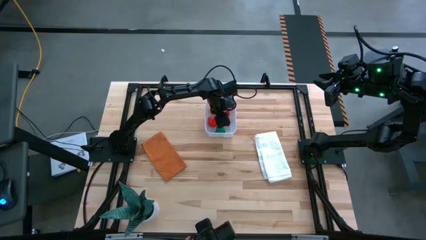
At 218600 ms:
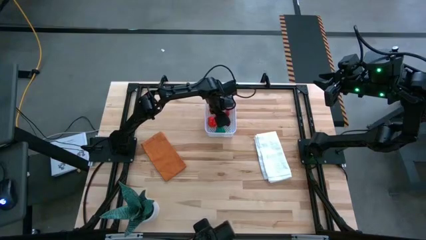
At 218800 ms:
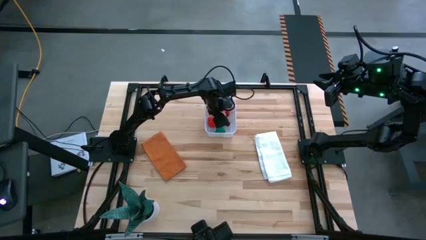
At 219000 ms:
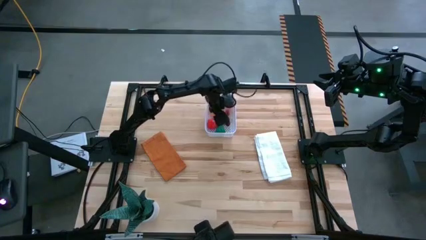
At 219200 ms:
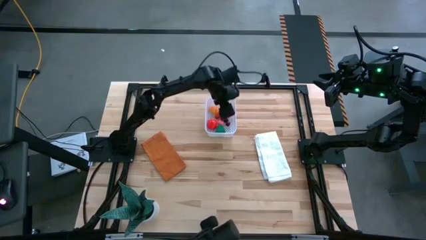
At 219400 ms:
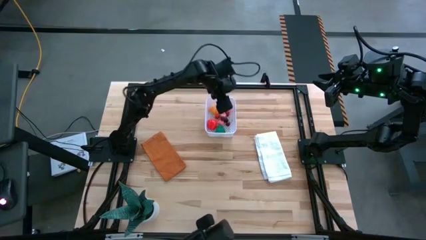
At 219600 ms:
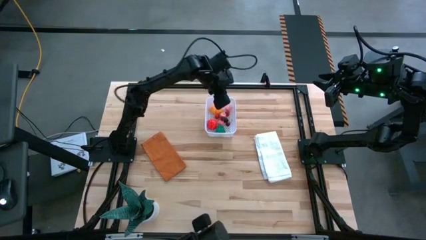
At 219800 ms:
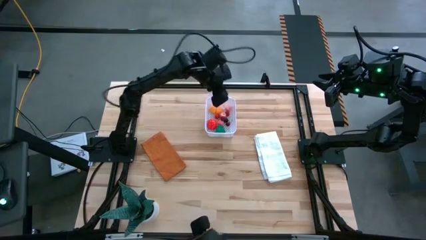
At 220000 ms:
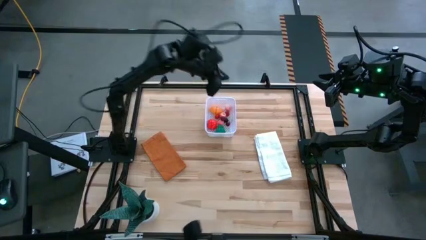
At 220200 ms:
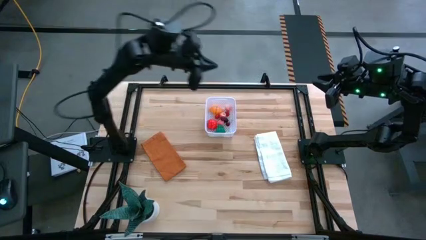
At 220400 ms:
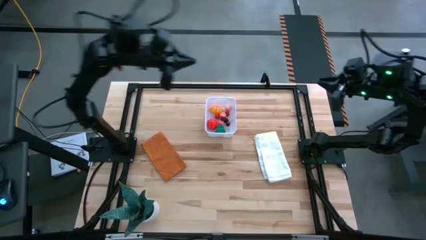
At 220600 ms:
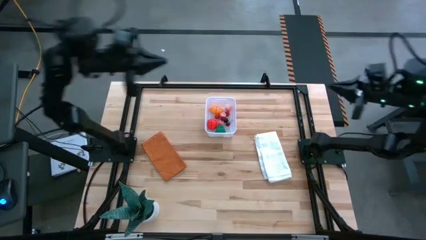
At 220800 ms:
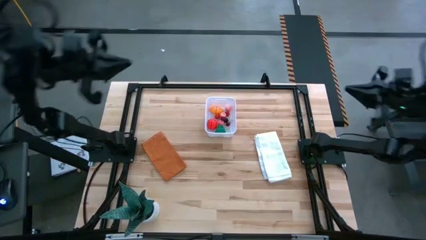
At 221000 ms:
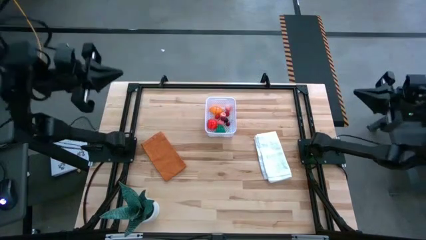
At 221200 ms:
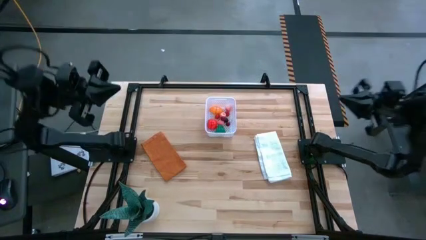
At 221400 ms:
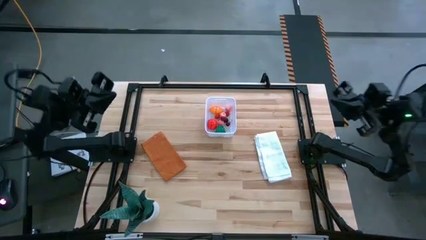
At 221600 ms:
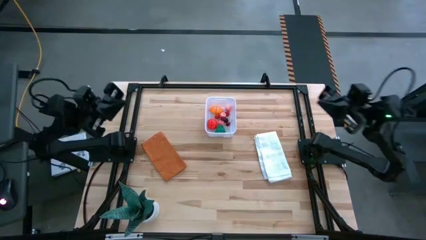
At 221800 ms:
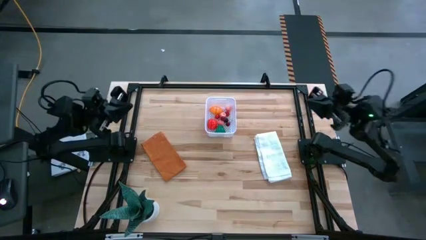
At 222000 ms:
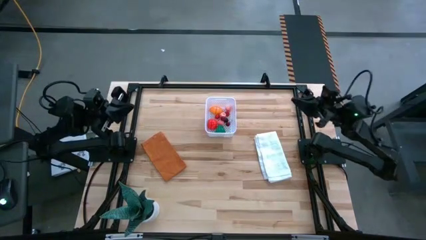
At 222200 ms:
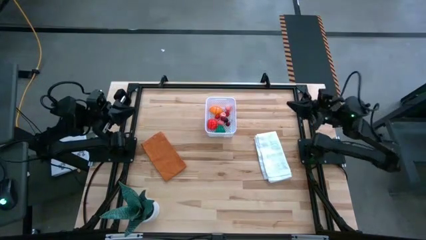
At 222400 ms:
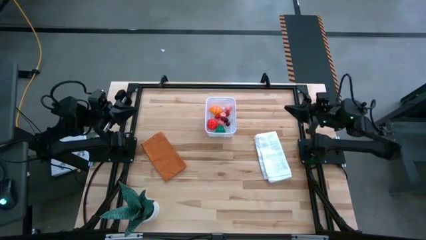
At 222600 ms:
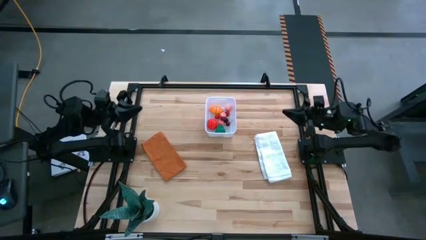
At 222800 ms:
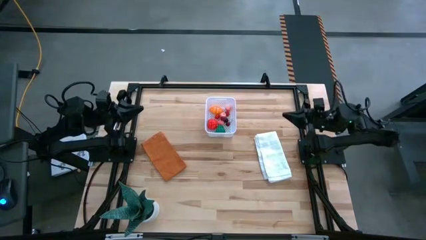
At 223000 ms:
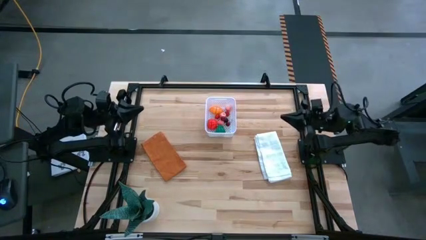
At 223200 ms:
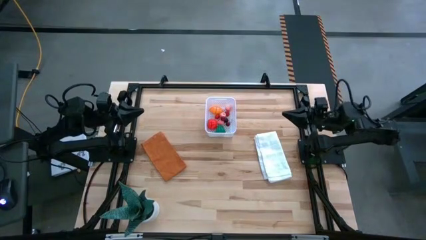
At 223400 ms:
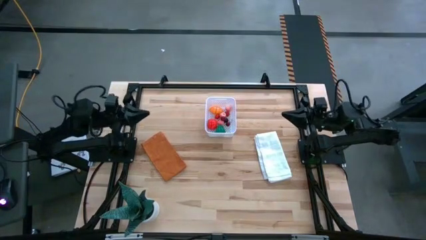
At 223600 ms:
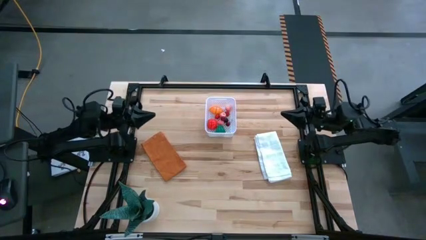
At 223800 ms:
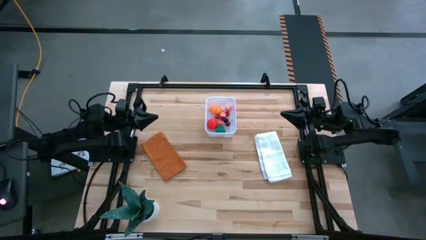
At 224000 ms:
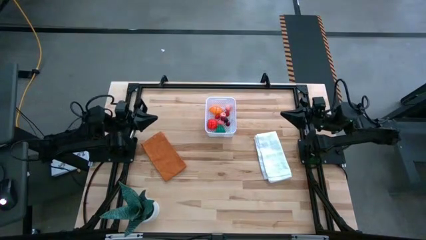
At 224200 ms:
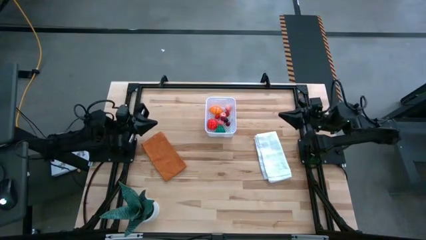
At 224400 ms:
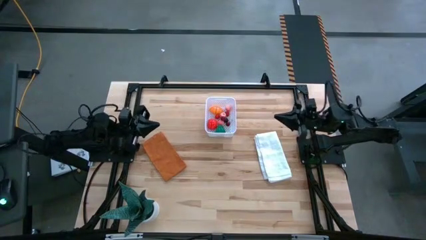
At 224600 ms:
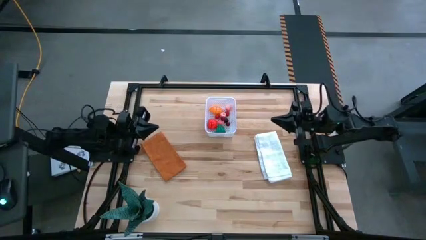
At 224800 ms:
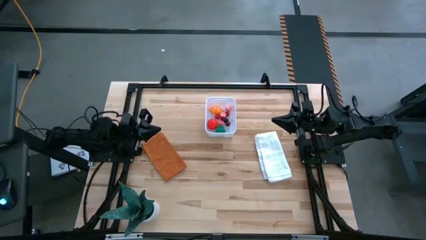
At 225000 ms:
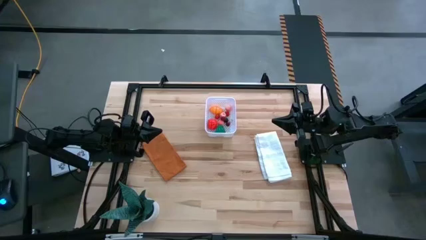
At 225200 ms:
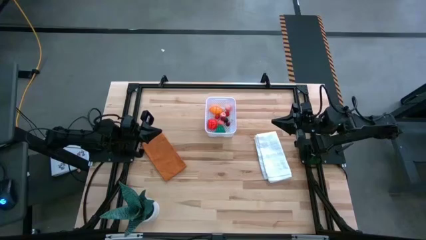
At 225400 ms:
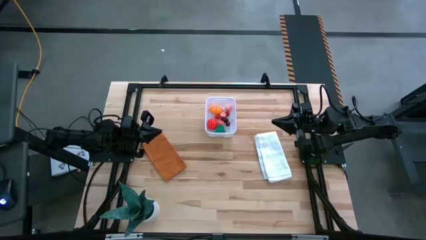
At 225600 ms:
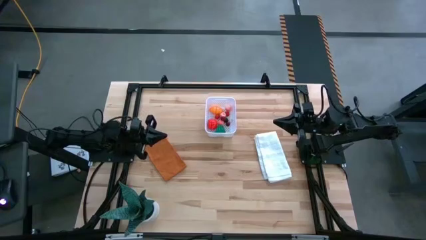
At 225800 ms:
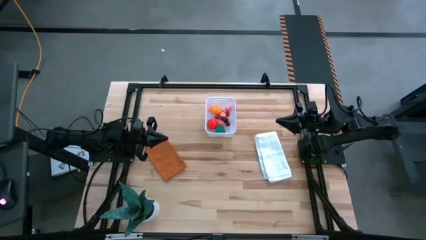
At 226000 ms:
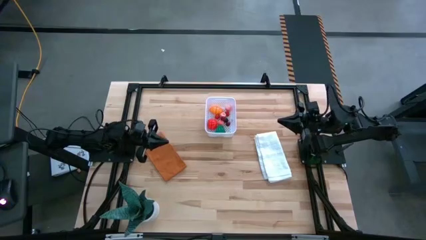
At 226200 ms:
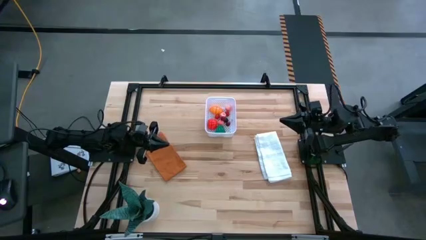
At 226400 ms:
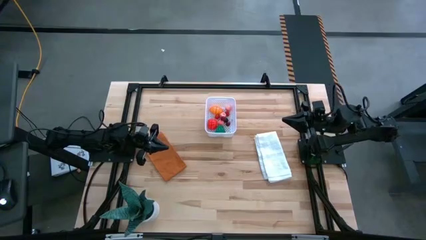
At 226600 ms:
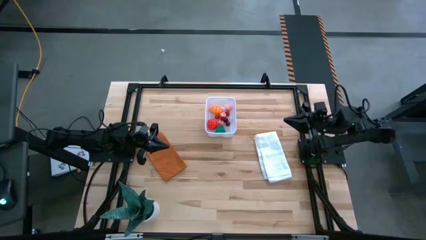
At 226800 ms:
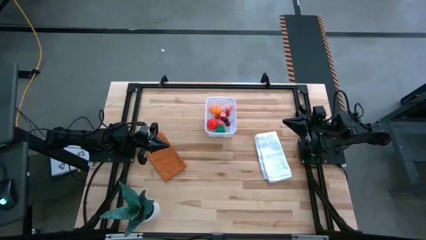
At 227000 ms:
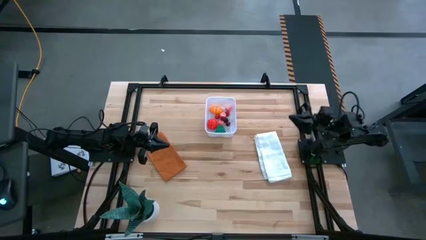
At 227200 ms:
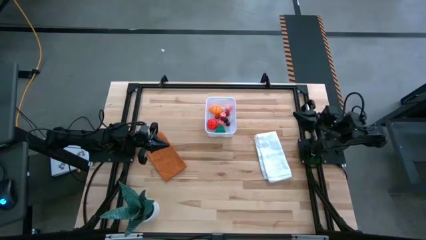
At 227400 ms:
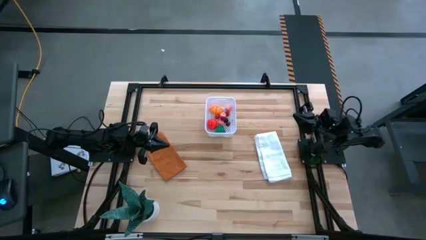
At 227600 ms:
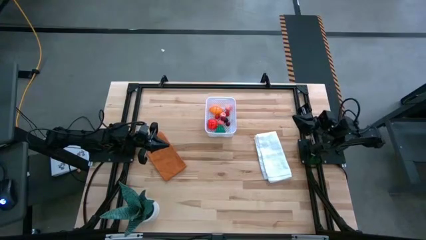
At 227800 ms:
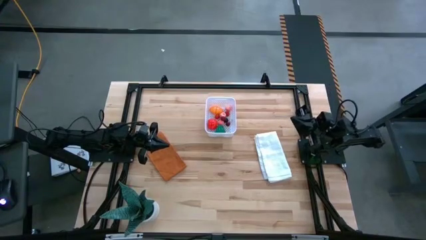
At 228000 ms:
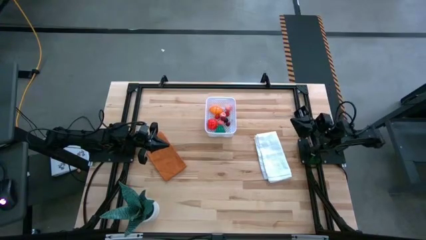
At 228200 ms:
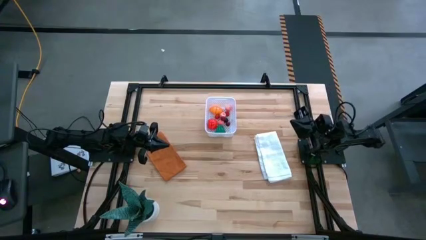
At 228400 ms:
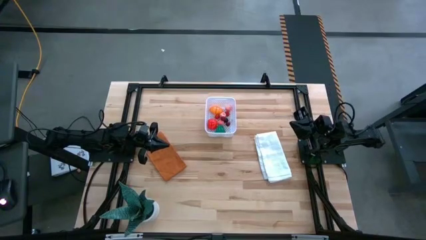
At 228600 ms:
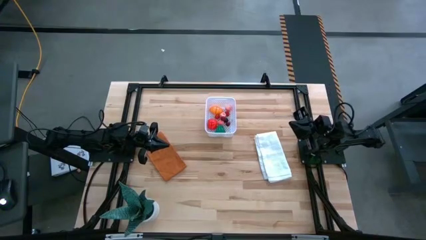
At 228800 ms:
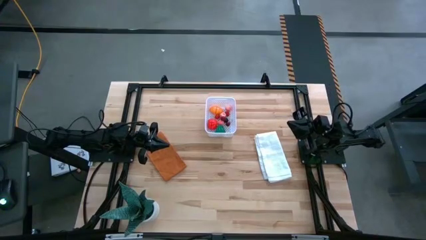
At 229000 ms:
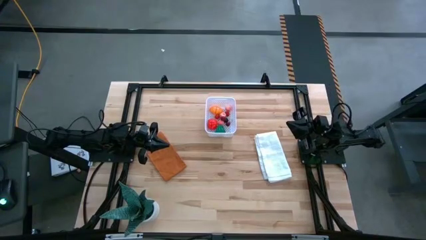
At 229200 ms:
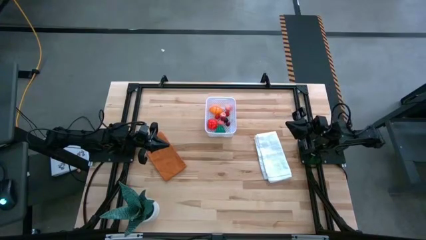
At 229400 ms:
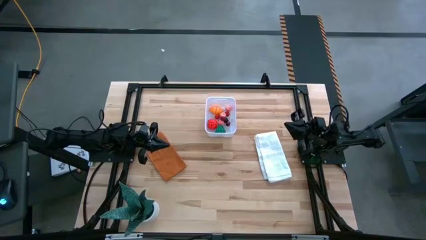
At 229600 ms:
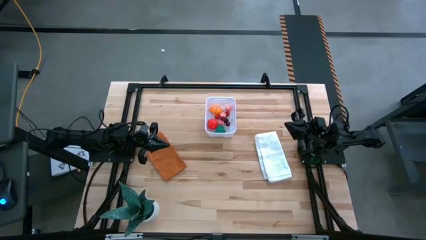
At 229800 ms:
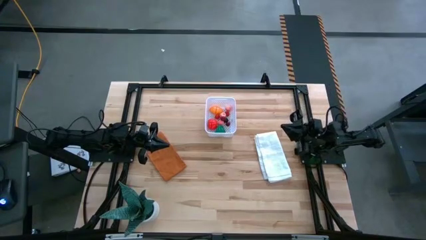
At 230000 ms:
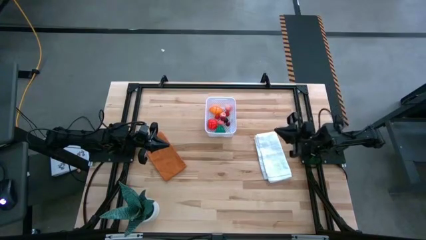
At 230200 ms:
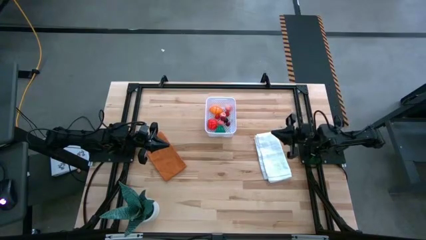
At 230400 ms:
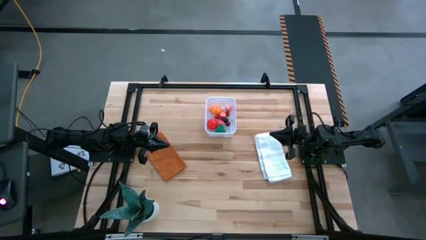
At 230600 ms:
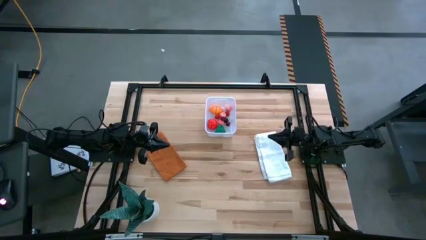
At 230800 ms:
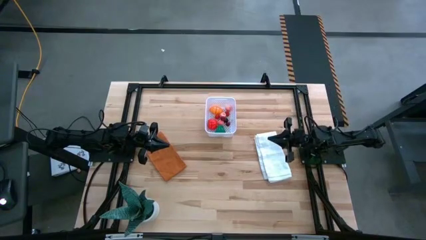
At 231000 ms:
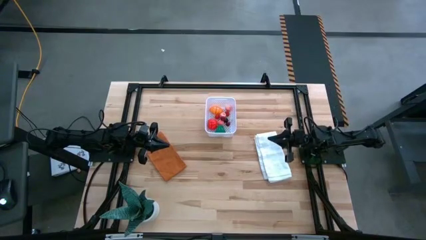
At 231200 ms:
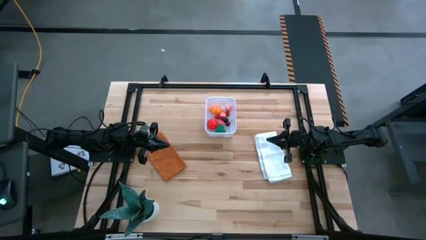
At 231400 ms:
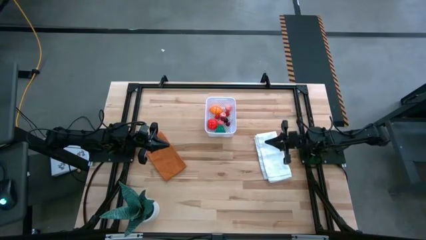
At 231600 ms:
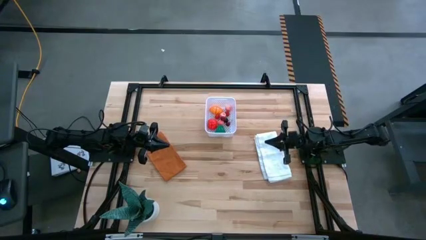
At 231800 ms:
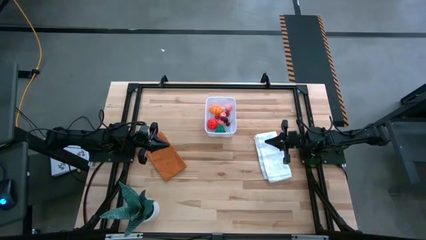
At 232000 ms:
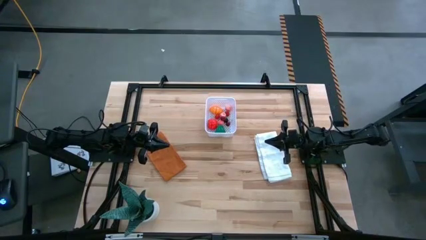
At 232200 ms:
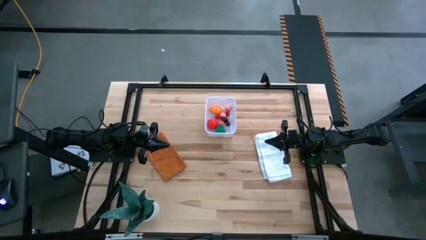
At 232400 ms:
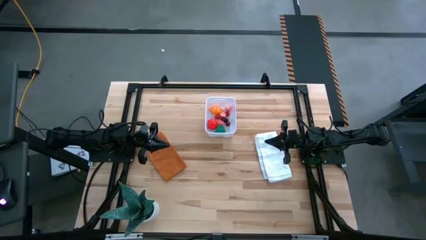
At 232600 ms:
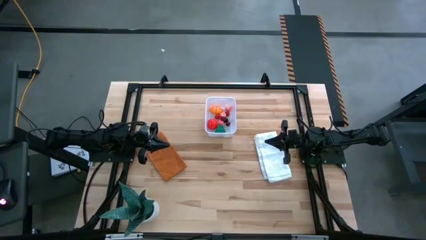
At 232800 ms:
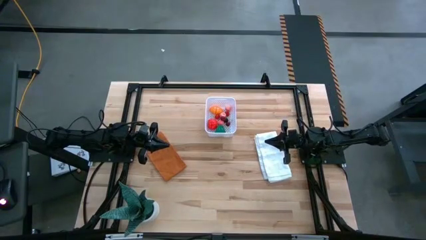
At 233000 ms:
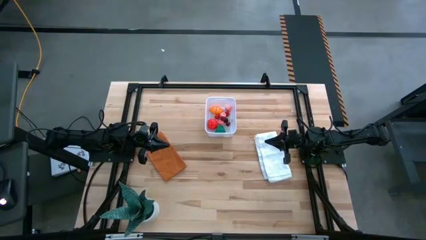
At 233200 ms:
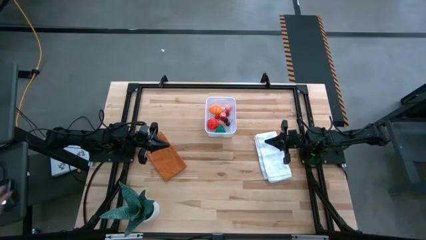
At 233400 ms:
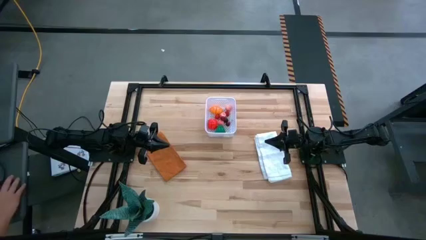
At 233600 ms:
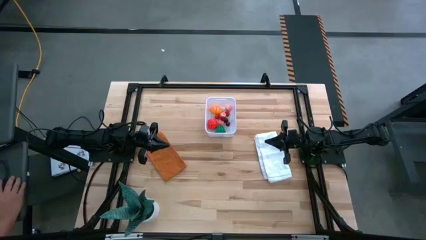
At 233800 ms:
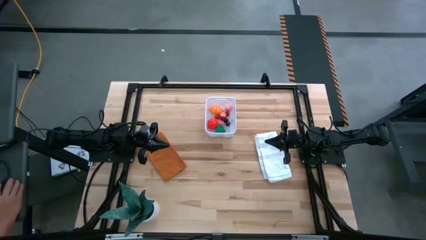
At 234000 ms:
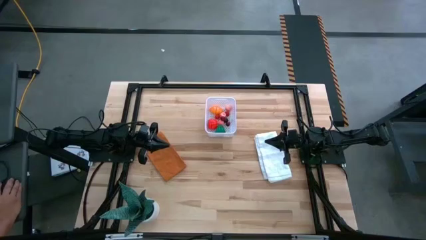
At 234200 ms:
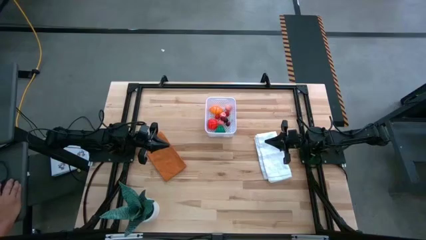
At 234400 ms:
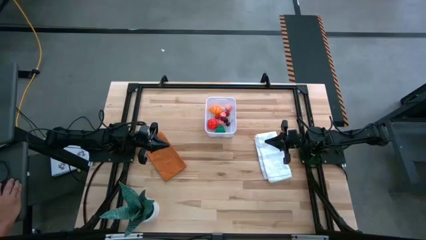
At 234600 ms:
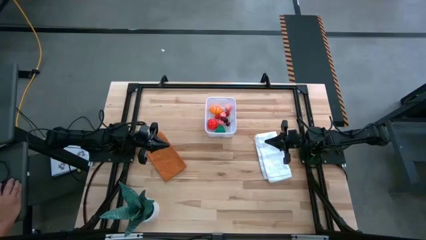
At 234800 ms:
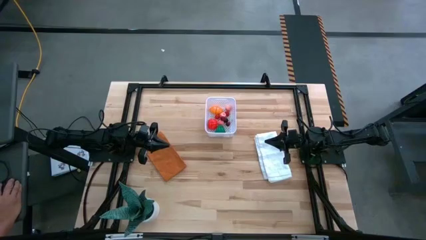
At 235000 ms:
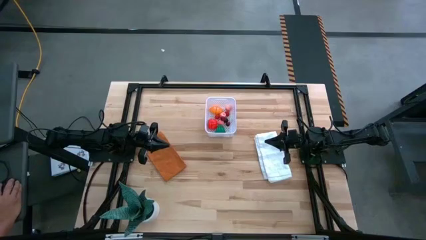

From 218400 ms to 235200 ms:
Task: Pick and placing Produce into tupperware
Return to Home Position
